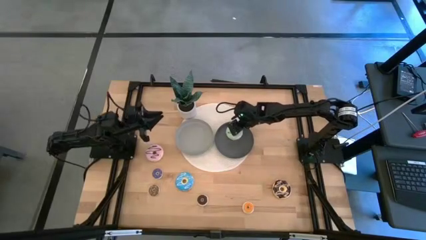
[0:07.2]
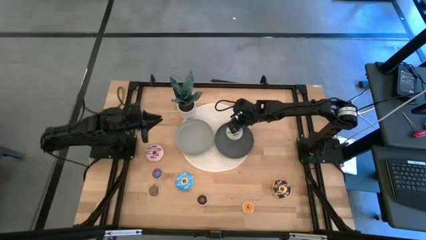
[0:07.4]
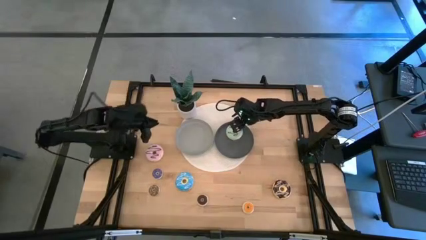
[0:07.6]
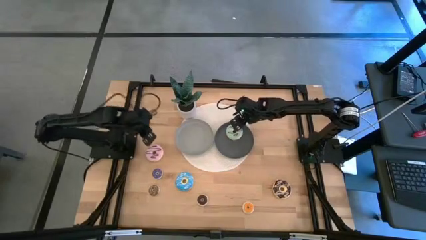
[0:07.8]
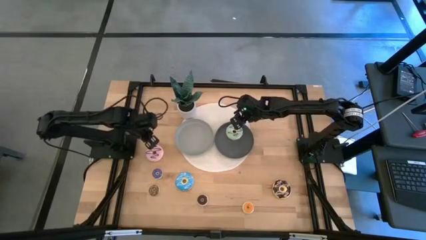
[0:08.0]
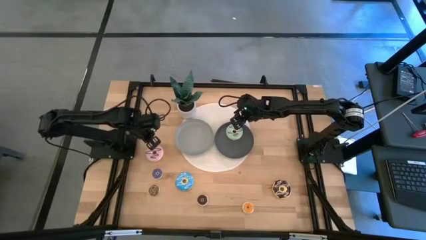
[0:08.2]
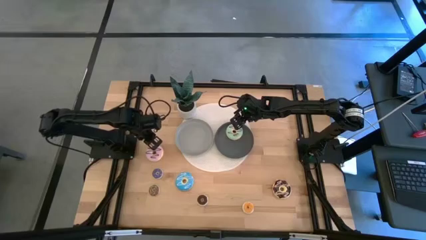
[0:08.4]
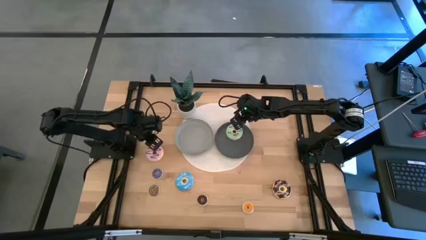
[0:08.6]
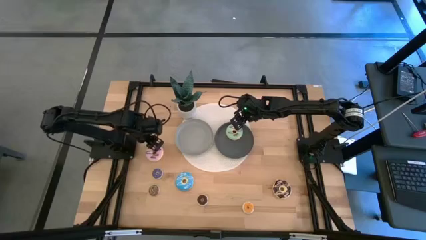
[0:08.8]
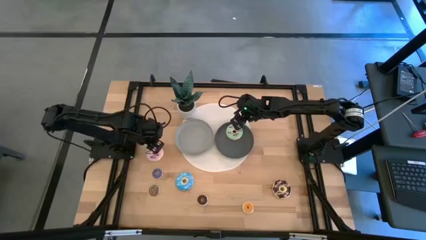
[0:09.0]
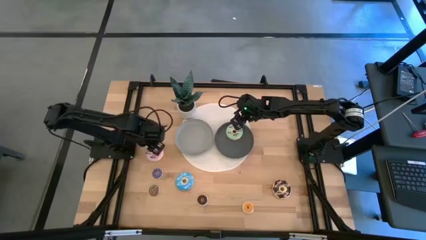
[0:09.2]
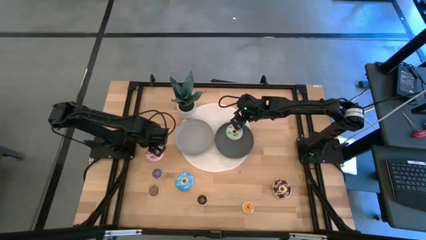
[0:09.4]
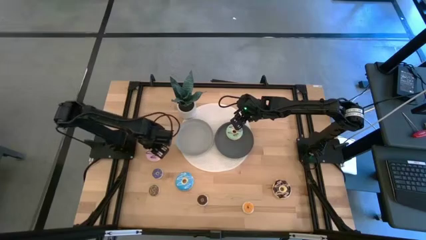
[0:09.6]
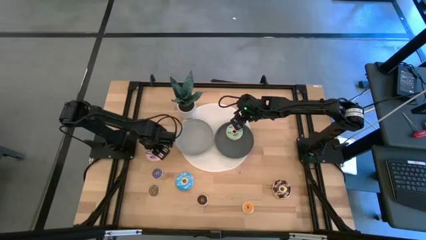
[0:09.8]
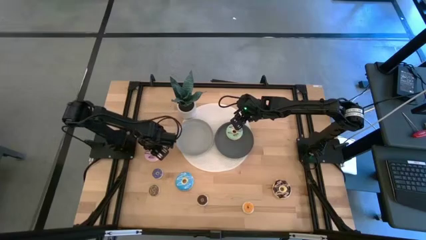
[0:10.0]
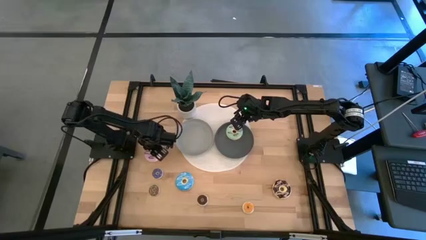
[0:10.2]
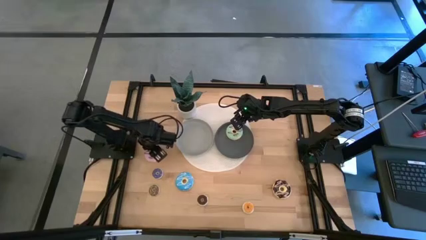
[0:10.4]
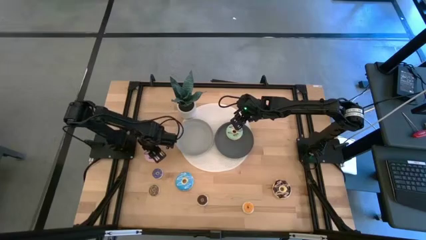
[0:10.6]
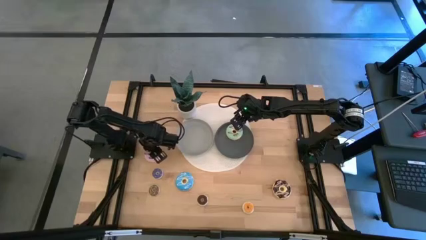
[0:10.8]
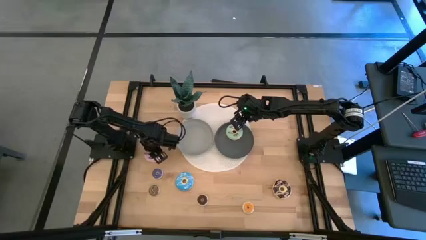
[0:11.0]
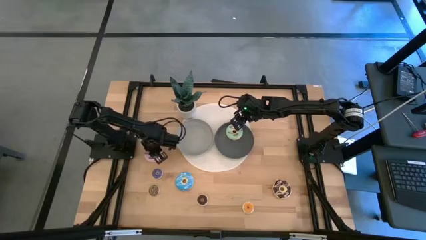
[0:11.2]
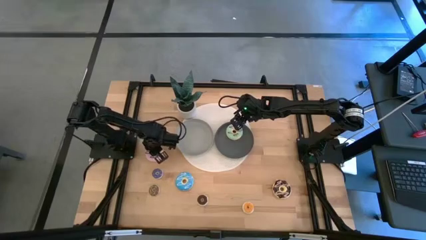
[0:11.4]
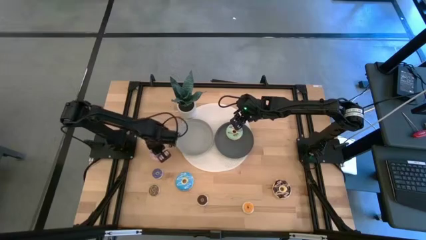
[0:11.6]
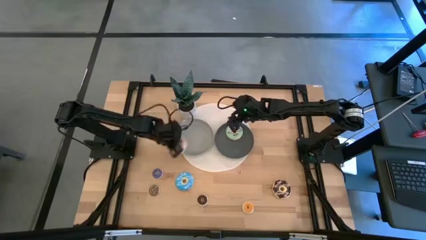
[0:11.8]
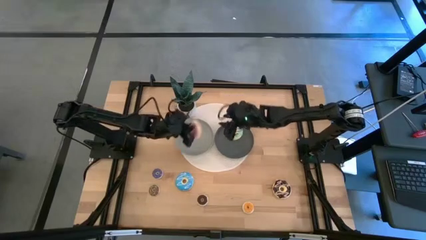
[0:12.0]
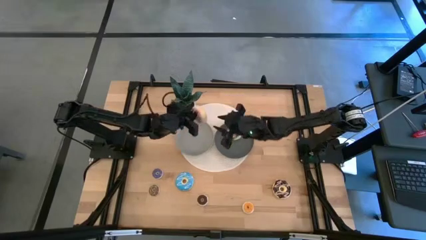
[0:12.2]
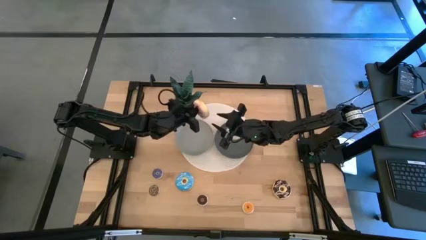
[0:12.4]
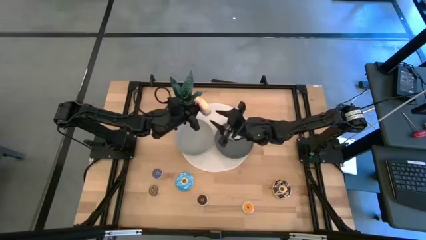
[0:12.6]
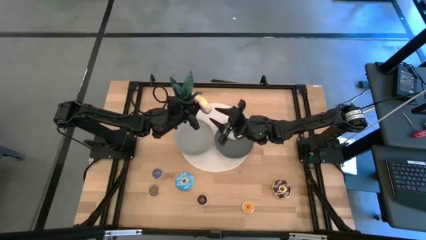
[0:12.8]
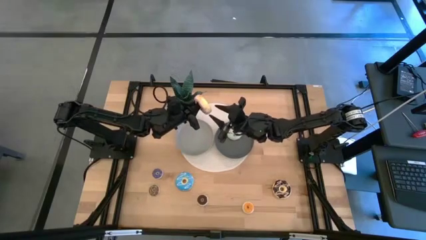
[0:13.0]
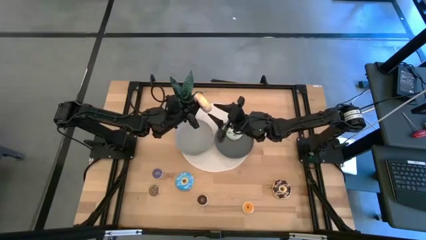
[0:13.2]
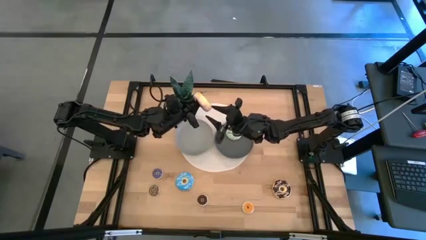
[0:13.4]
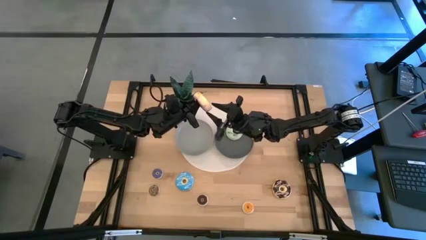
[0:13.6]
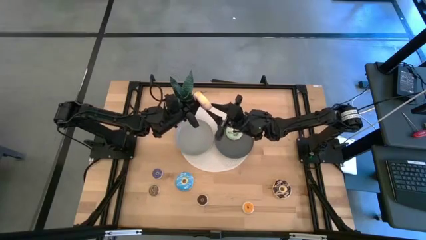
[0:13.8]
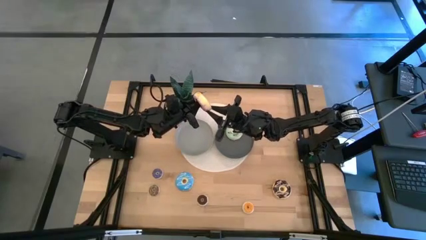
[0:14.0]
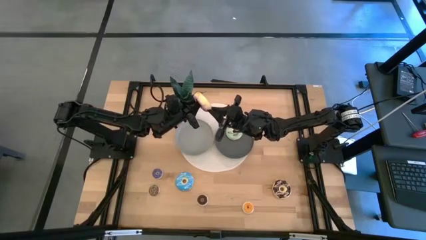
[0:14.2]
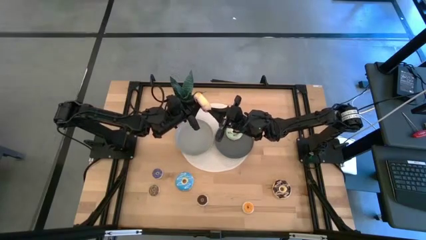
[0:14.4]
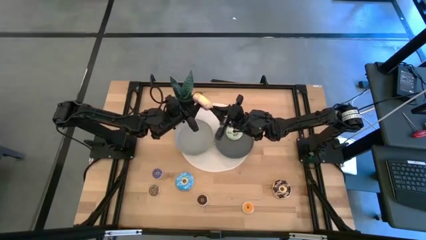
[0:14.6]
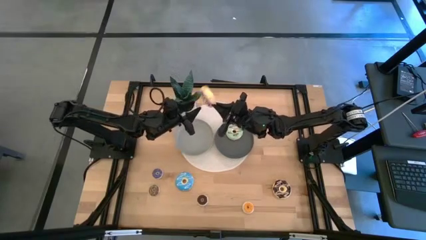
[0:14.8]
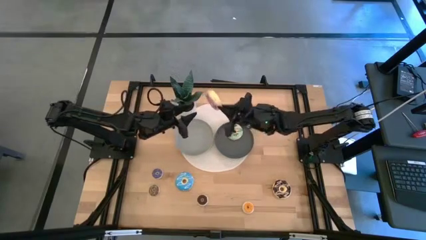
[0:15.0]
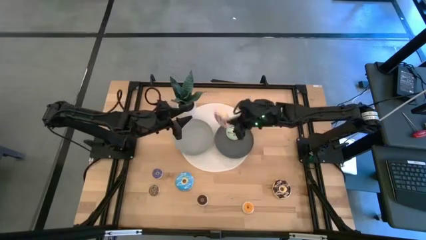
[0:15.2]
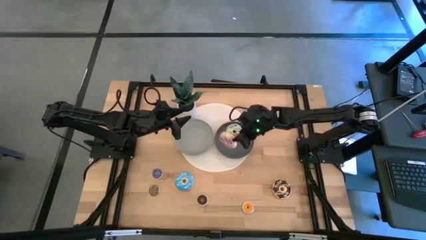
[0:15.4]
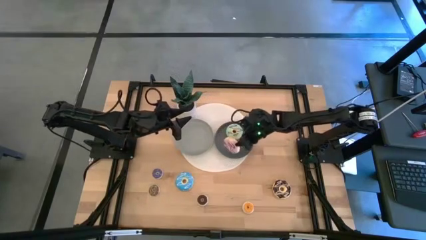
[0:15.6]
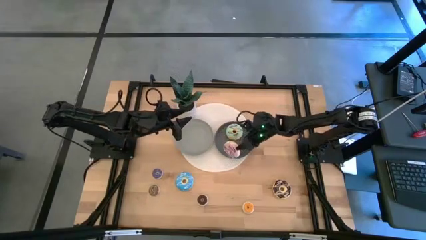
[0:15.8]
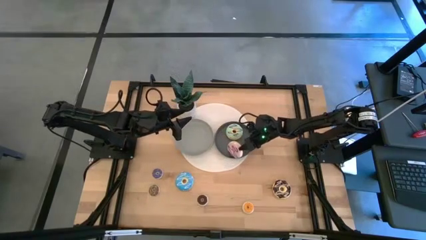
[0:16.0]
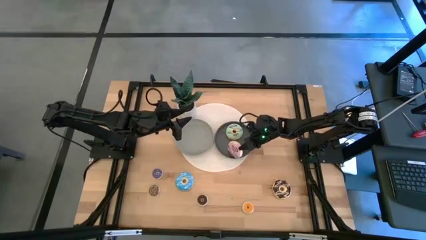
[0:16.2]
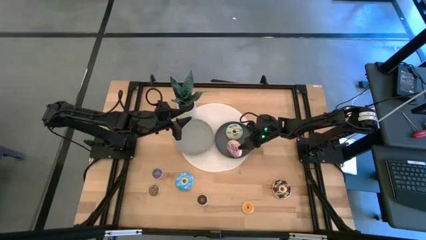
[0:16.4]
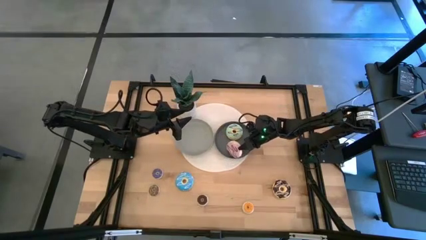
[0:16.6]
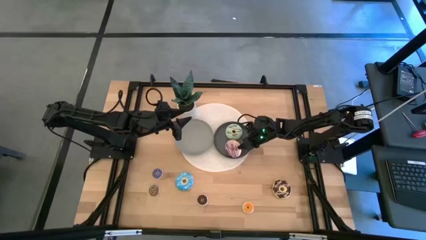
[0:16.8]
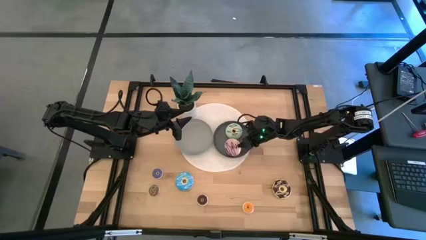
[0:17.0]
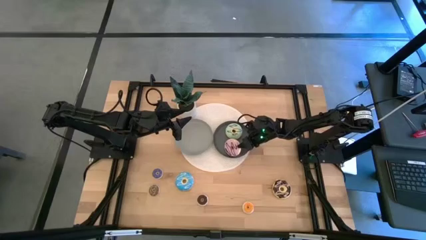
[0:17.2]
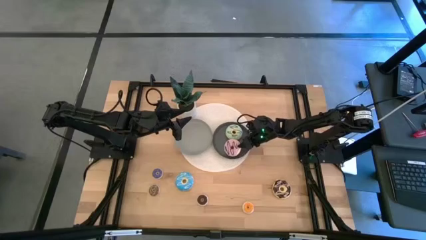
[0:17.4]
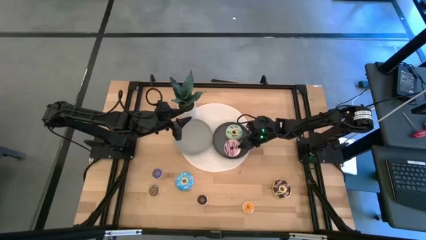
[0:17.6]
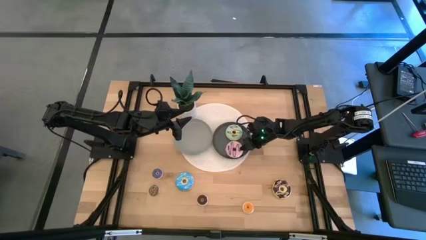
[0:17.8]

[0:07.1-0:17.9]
Task: Pick & Place donuts
Put the large pink donut on the green plate

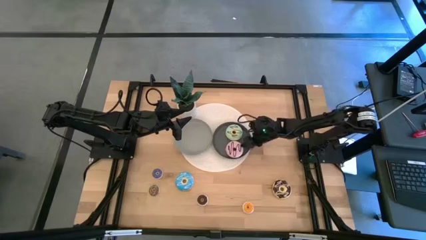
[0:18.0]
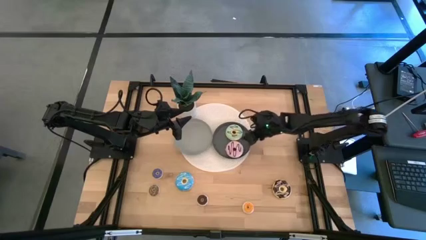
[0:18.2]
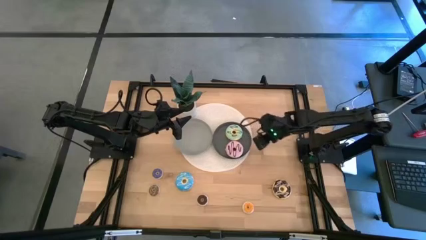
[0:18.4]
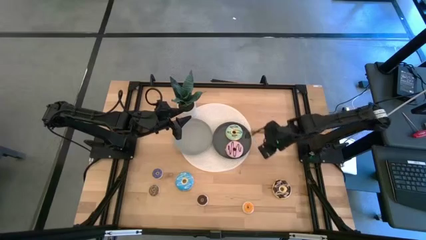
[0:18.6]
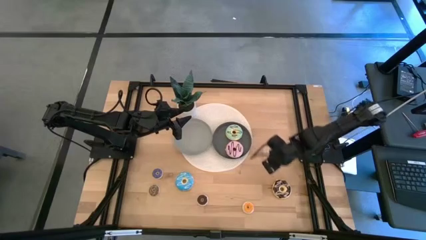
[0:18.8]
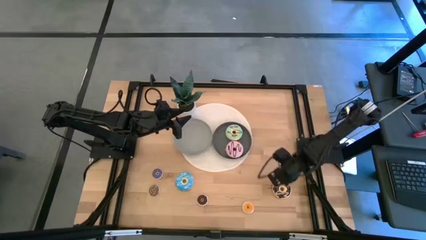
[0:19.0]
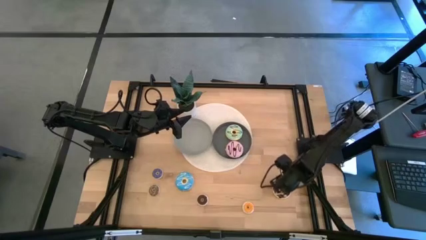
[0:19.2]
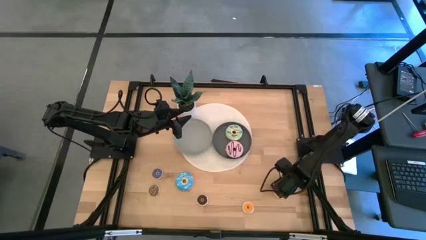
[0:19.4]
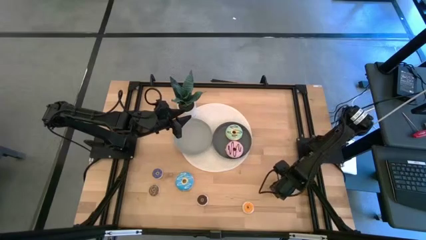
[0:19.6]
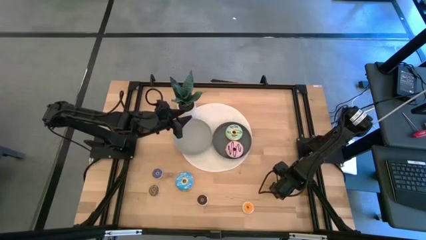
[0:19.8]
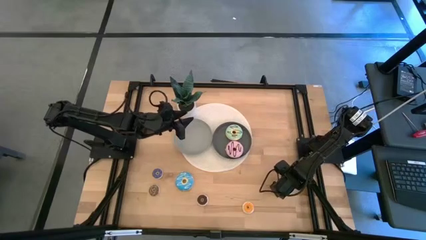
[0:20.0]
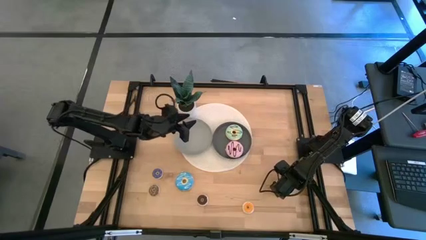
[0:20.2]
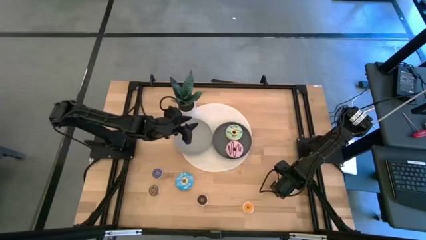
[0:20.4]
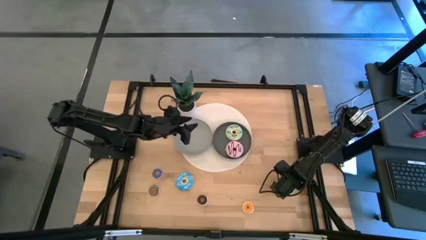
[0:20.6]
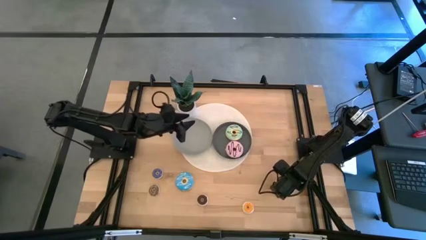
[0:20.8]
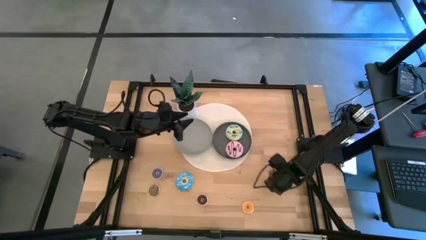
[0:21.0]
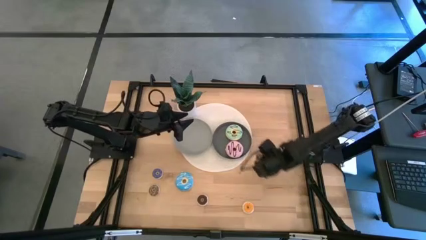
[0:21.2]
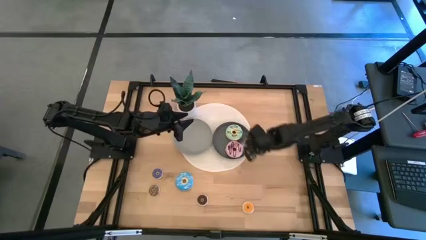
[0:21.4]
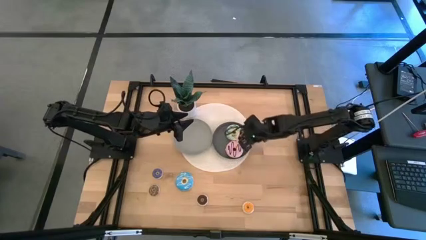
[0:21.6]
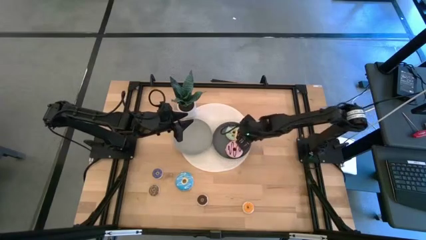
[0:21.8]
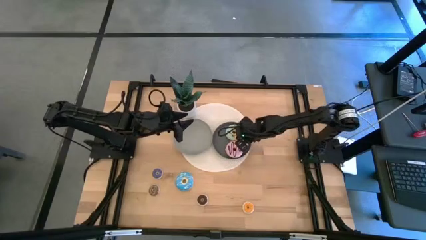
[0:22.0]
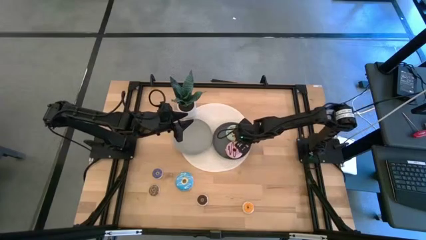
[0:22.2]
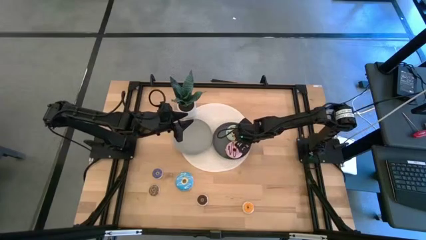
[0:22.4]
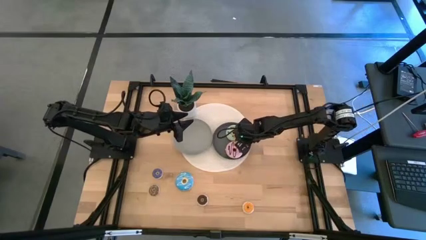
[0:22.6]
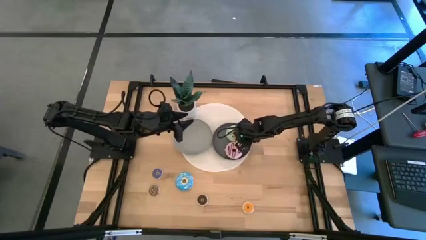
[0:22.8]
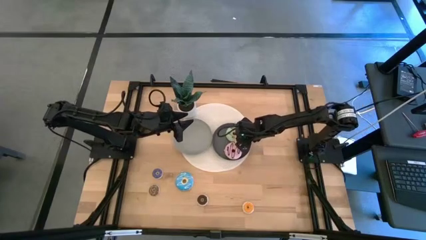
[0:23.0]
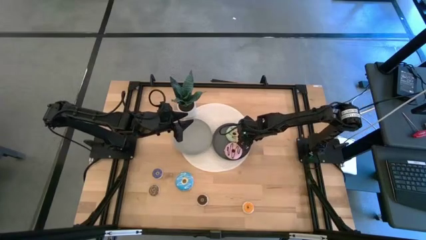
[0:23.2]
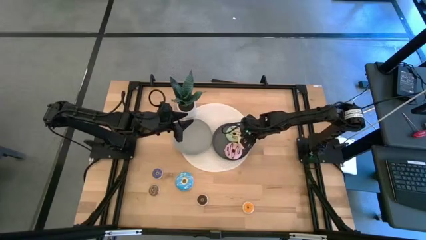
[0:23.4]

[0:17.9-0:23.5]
Put the large black donut on the green plate
